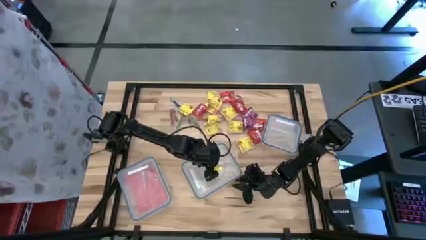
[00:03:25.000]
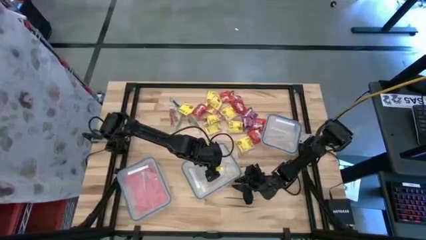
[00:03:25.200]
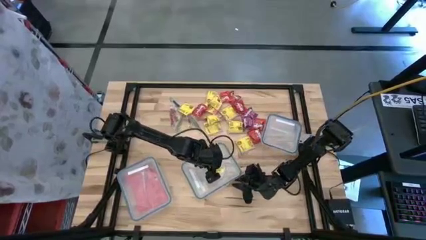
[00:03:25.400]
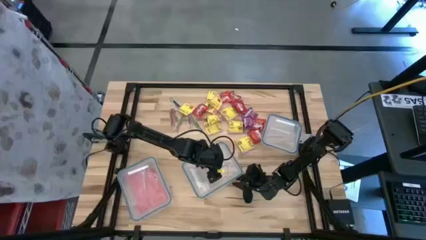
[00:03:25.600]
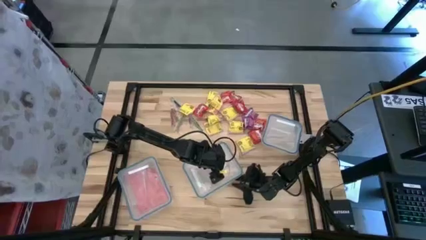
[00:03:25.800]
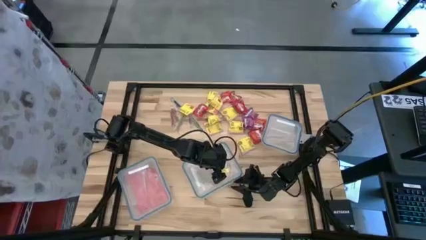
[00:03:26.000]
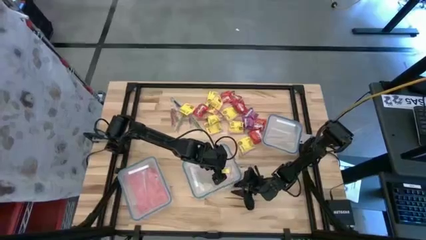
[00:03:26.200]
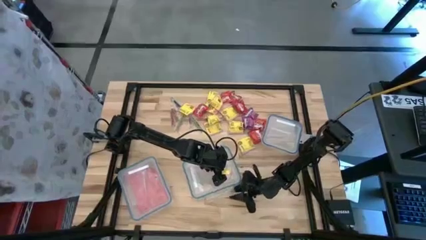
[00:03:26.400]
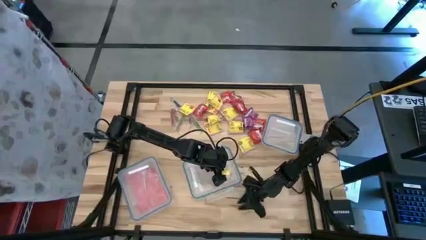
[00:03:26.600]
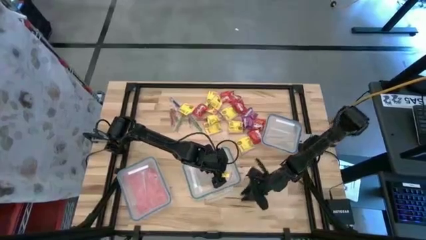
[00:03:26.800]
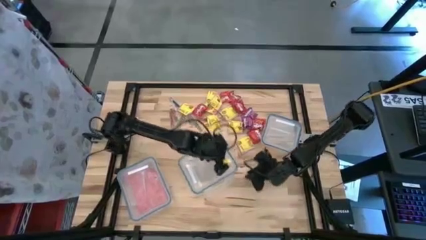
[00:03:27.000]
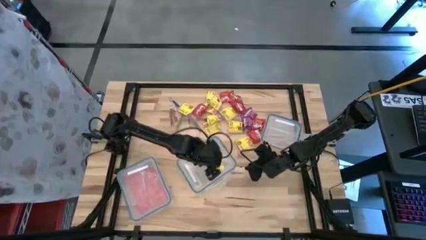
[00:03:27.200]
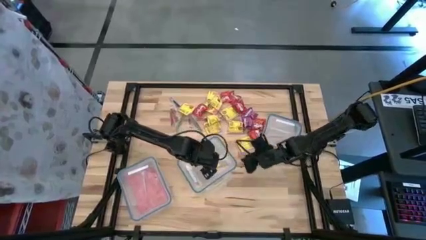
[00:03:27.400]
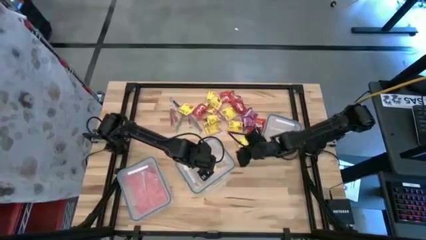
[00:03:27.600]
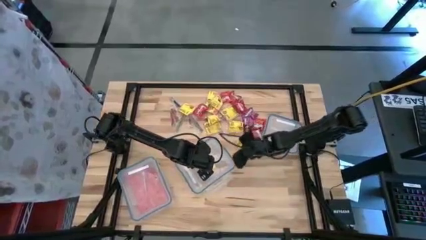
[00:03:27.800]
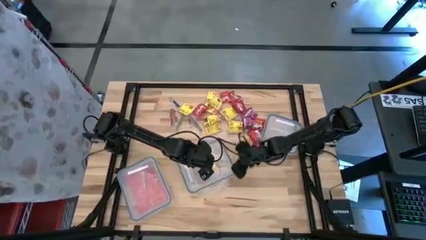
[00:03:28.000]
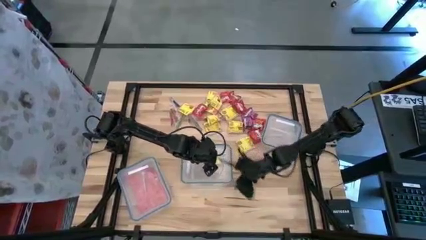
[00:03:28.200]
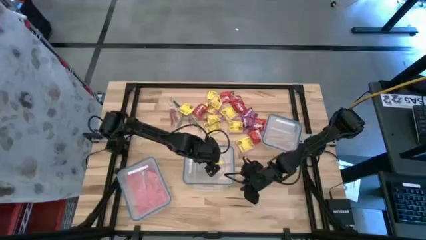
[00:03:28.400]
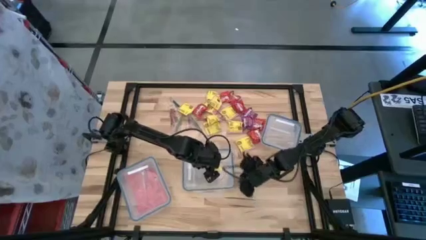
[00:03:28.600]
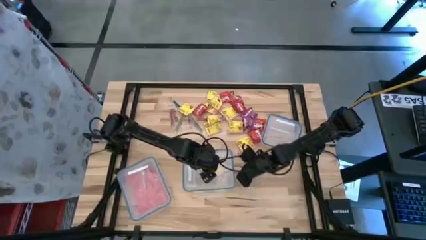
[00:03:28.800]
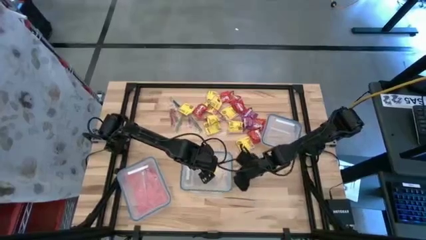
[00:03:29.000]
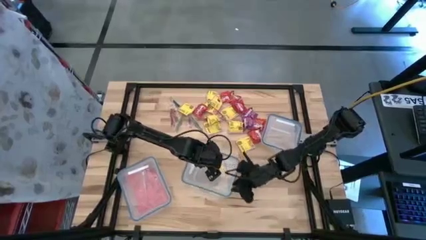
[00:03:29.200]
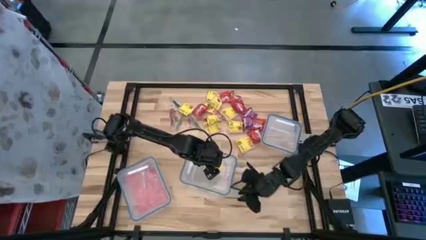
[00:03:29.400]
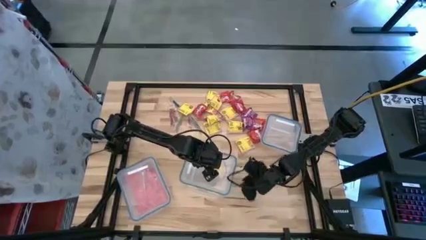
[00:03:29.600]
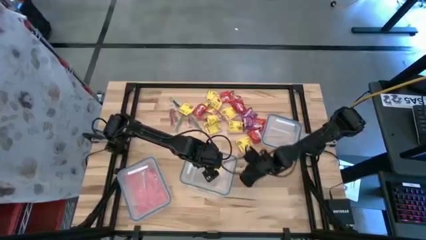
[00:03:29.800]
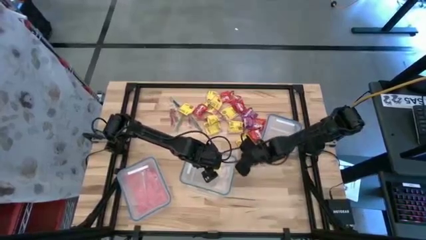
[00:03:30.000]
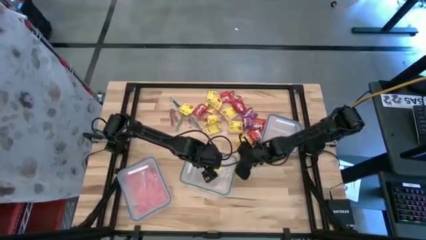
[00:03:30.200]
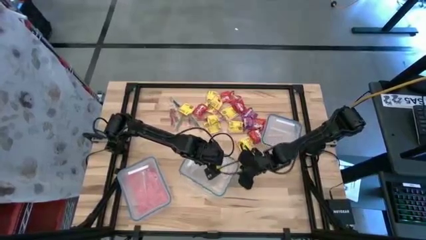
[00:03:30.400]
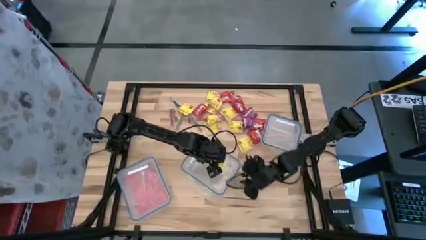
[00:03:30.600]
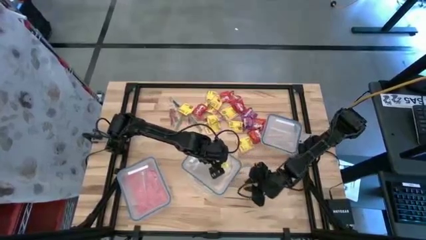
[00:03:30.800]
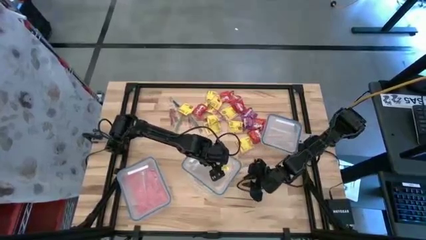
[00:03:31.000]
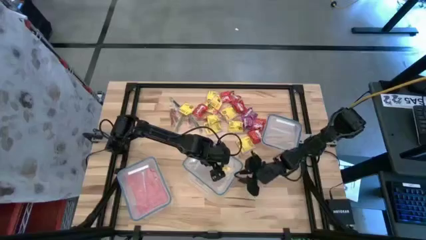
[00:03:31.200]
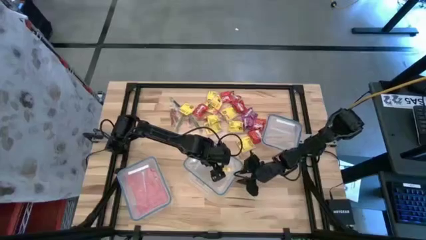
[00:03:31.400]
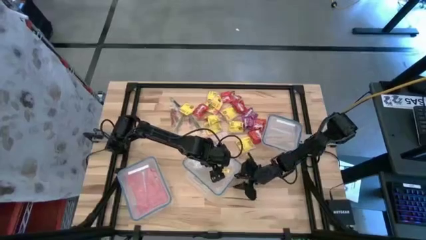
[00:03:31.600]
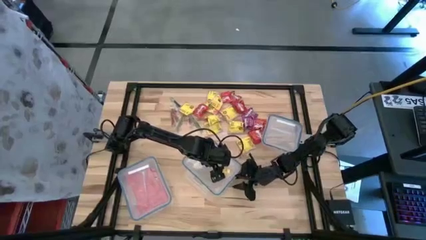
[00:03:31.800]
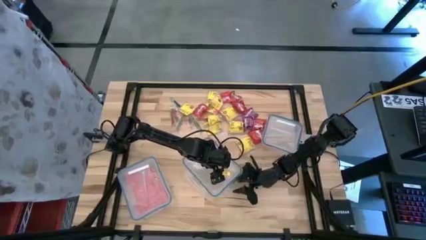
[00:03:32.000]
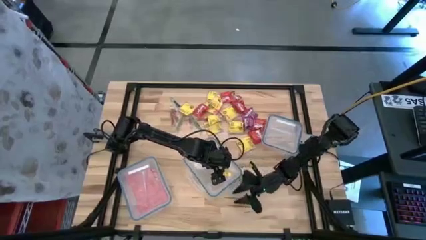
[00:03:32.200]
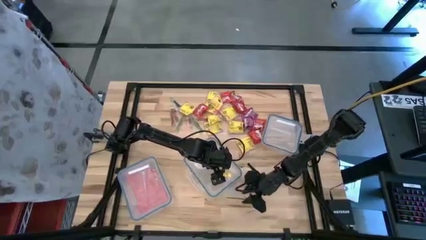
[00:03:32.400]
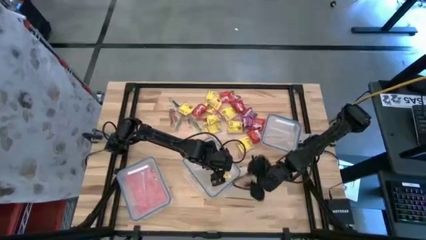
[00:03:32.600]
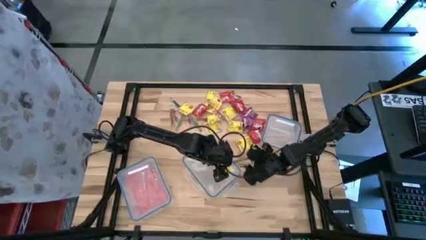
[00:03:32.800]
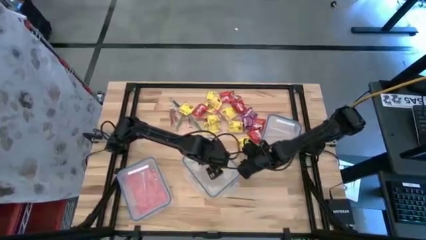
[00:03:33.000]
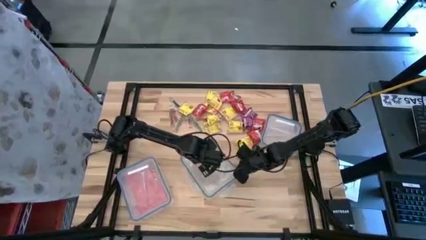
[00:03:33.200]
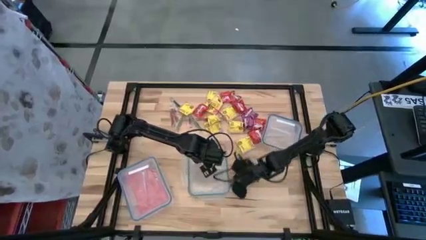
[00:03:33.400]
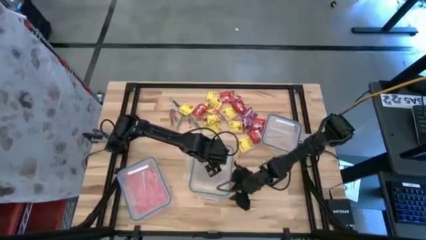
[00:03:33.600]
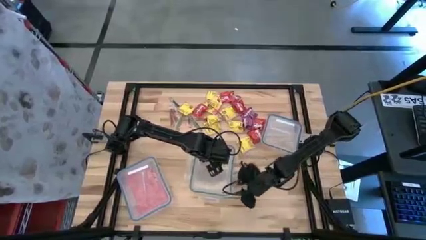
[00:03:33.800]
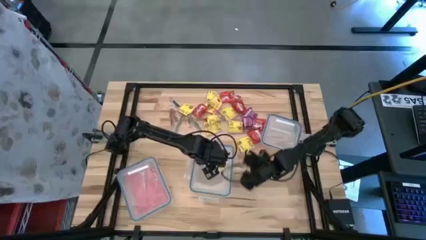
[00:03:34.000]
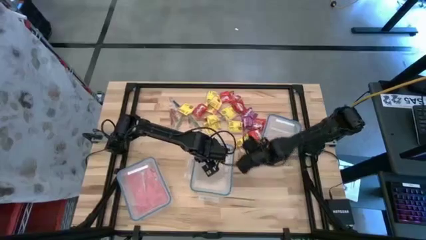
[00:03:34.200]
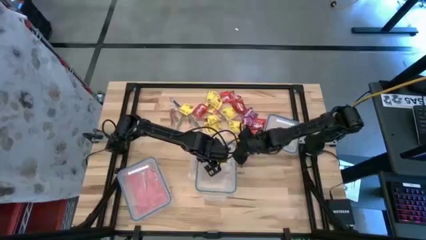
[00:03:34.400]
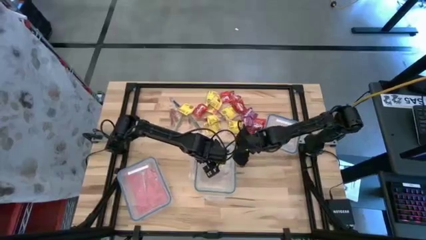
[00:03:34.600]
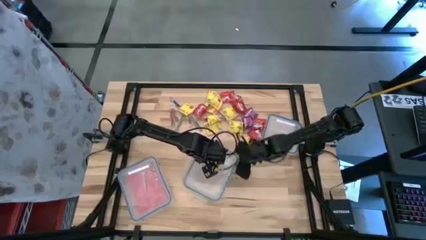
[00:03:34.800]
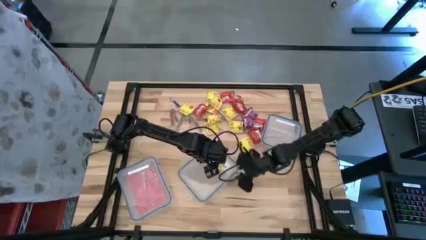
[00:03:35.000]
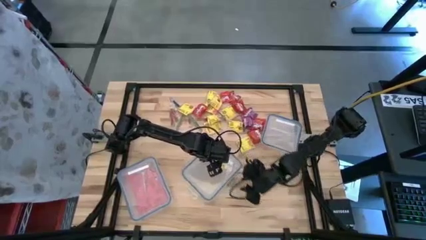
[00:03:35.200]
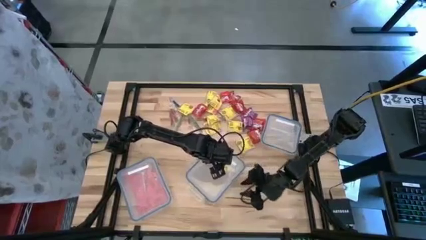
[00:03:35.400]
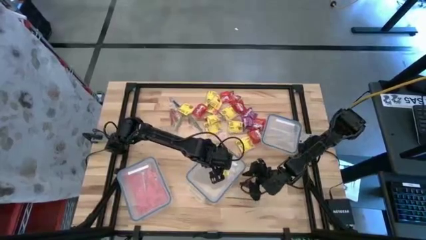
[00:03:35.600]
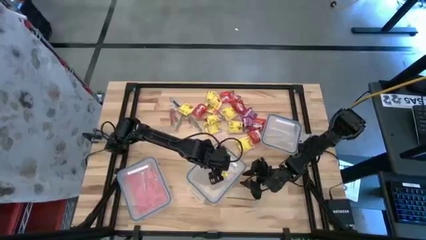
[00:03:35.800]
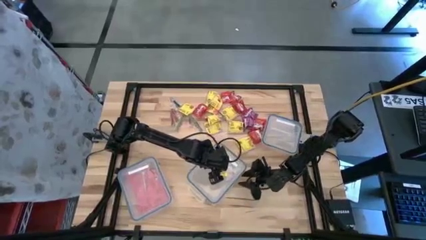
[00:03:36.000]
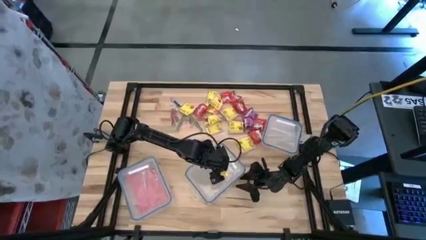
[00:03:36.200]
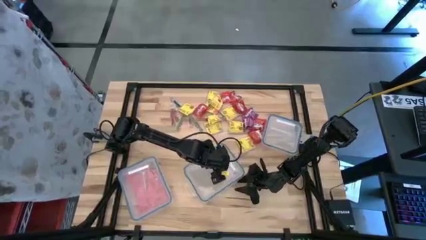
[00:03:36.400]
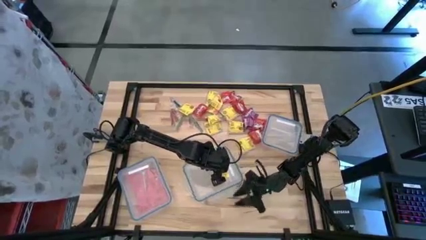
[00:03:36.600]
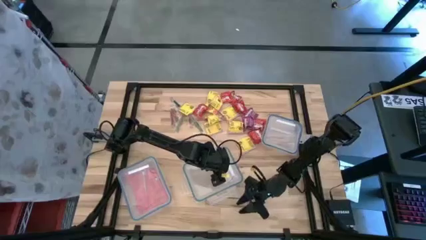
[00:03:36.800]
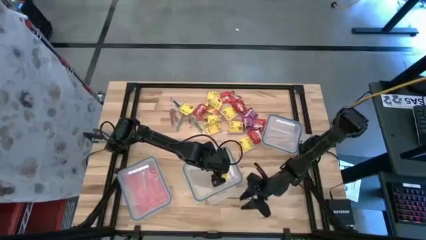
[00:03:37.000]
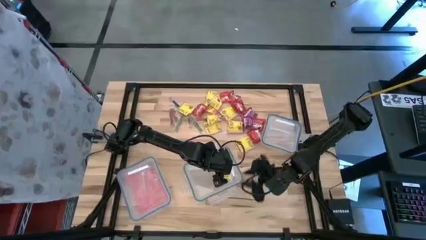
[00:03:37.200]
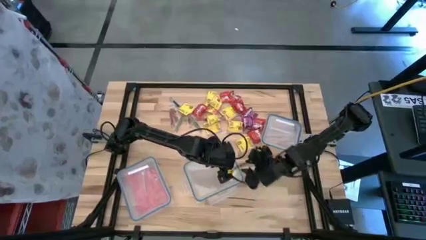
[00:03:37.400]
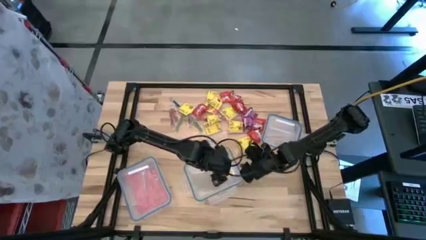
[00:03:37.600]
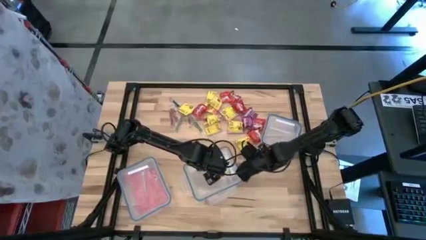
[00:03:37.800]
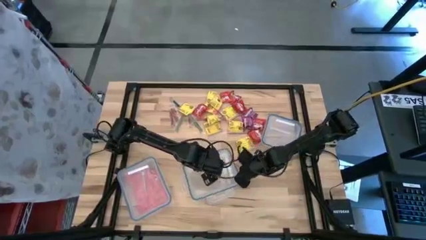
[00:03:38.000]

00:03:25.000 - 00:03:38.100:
Task: Sort candy
Open the rectangular transparent bin

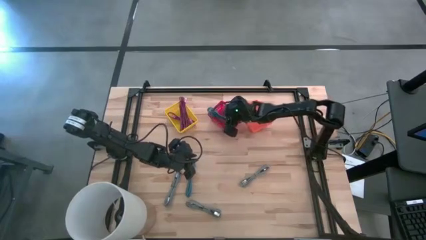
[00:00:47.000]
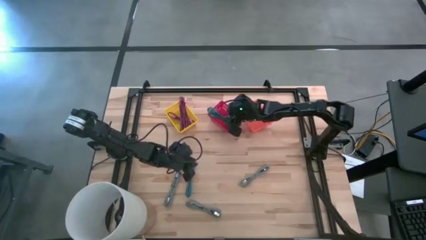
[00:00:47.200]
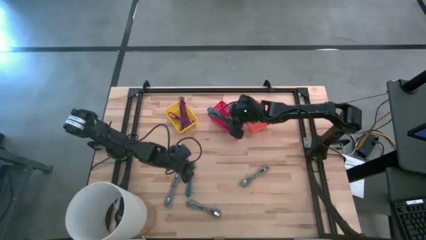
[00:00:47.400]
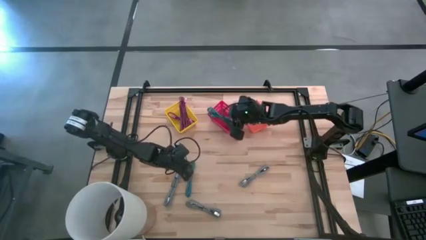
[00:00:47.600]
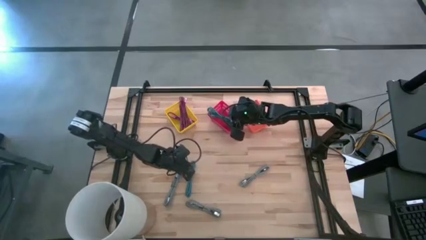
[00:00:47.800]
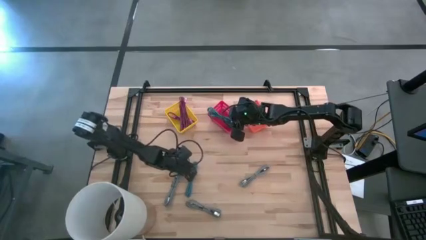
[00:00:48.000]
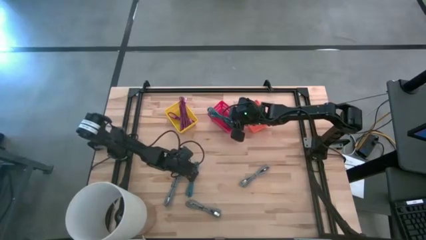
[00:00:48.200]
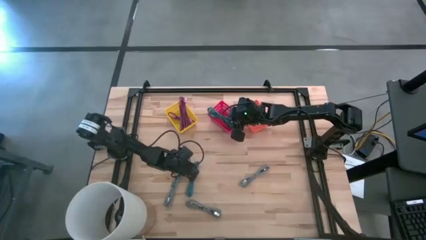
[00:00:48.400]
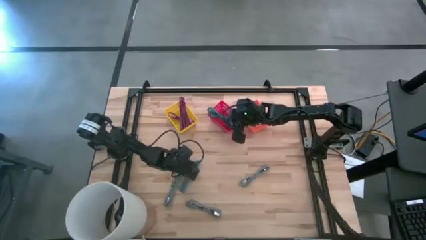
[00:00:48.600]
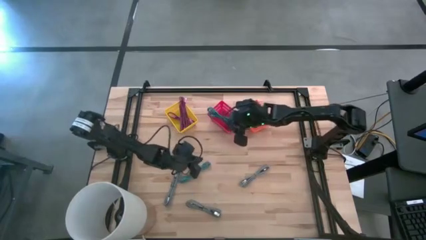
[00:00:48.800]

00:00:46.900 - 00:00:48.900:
Task: Pick & Place USB Port
Put the black blue USB cable into the red bin
